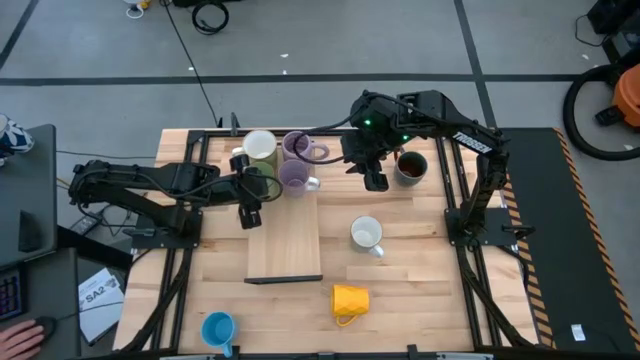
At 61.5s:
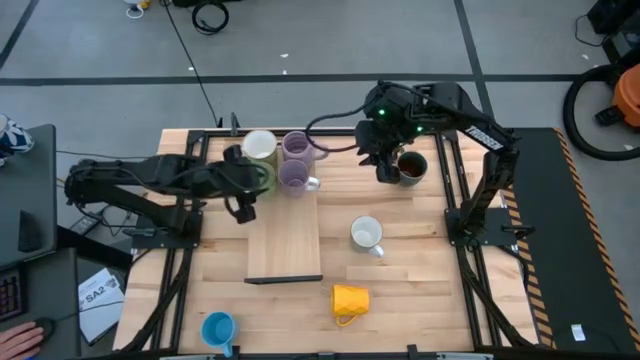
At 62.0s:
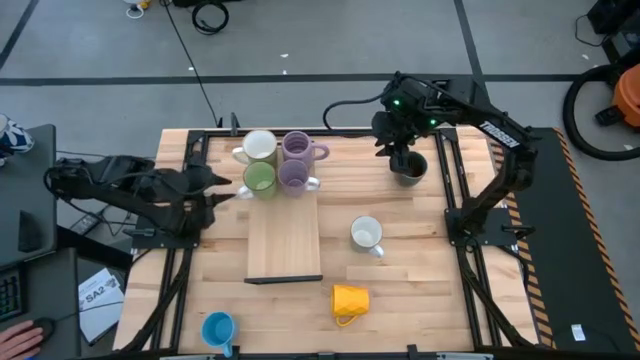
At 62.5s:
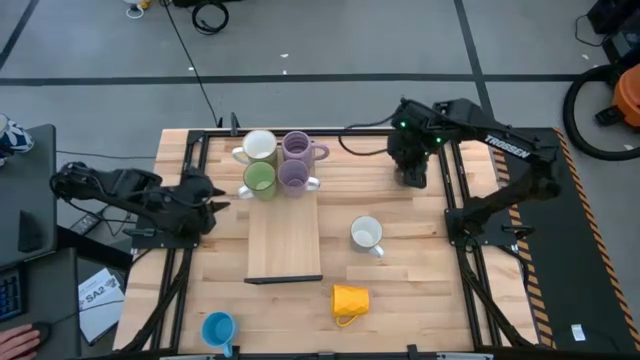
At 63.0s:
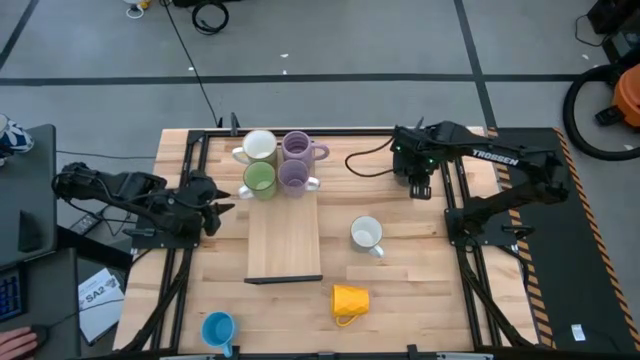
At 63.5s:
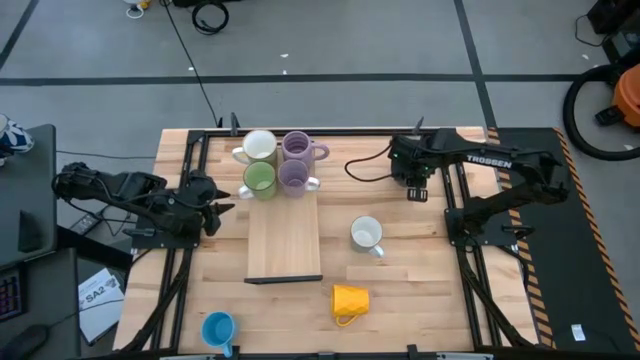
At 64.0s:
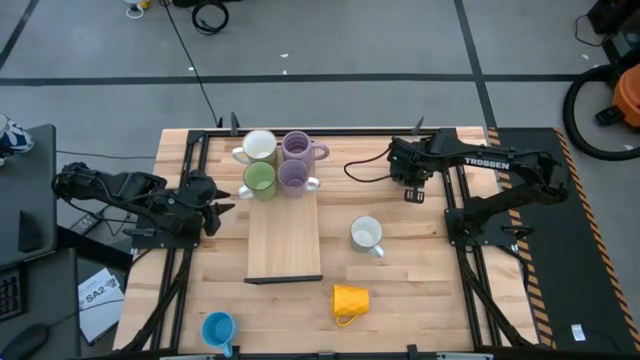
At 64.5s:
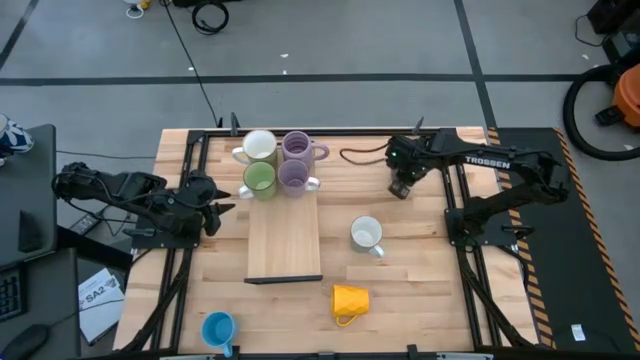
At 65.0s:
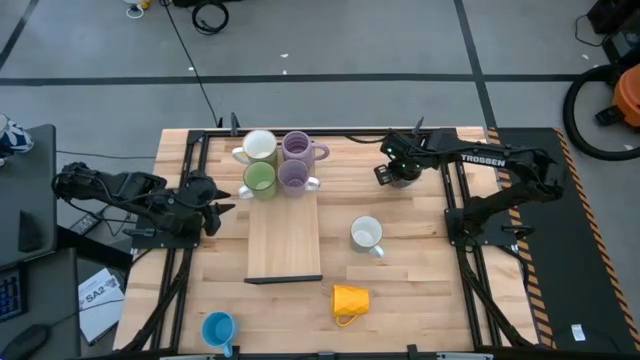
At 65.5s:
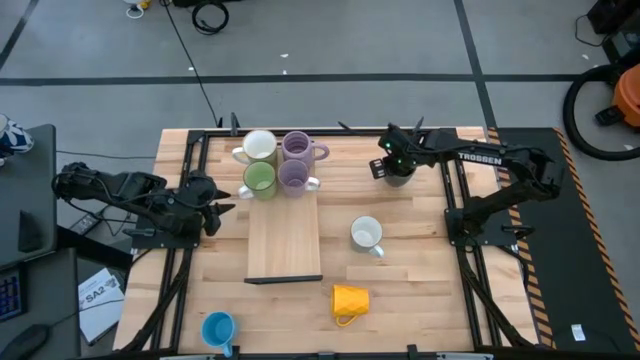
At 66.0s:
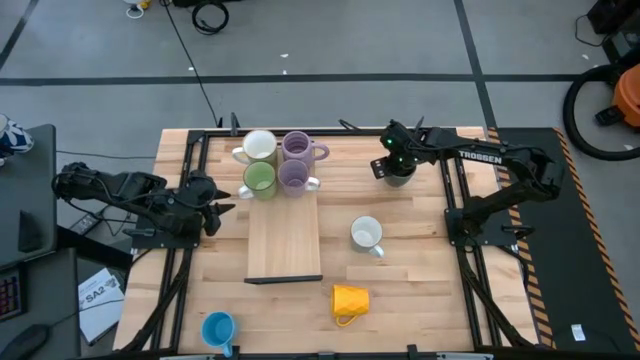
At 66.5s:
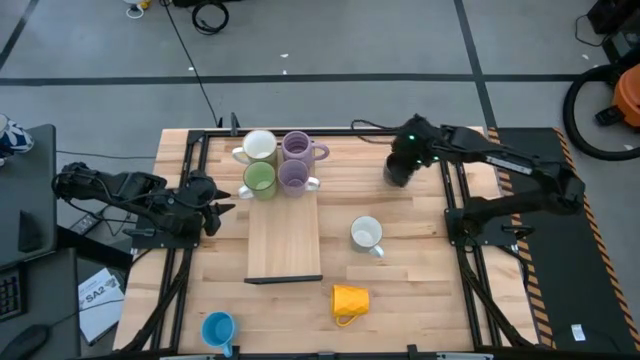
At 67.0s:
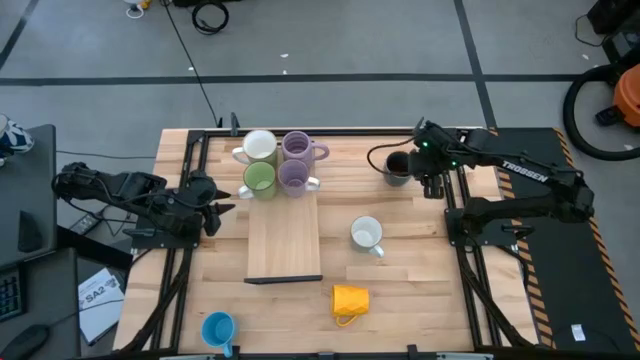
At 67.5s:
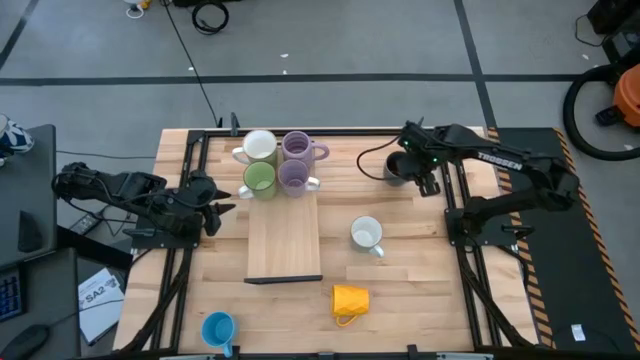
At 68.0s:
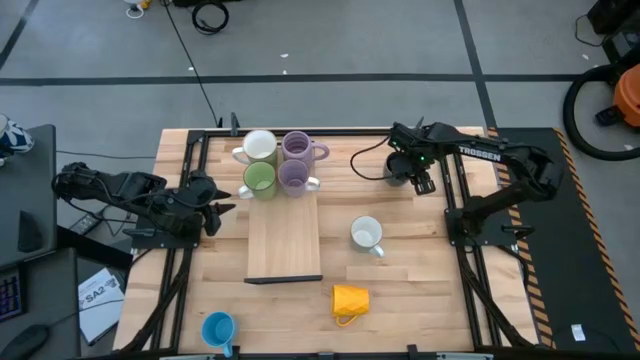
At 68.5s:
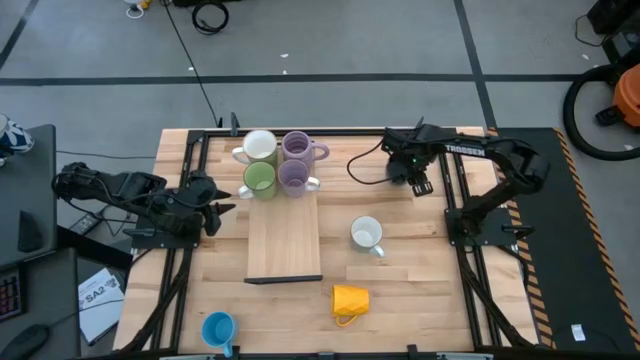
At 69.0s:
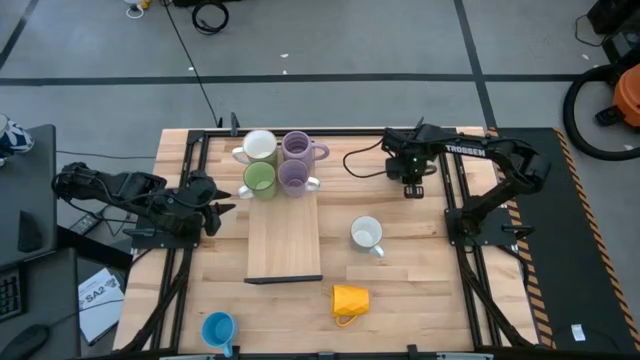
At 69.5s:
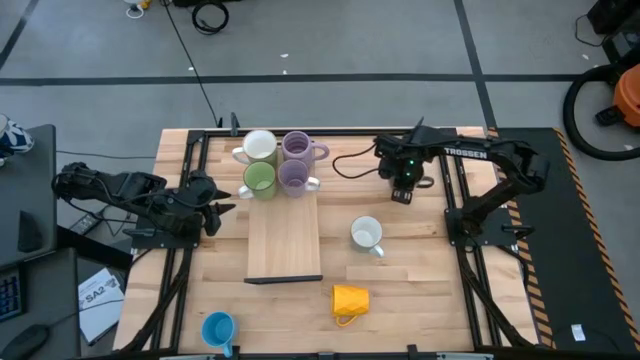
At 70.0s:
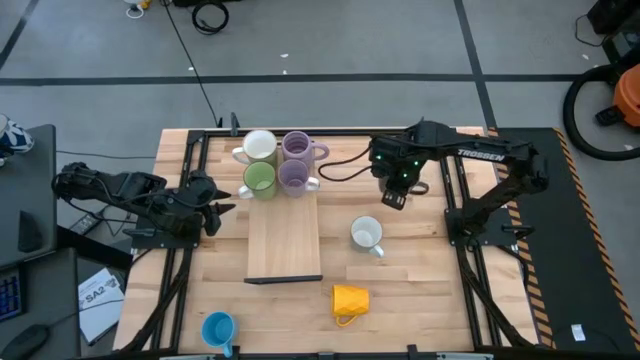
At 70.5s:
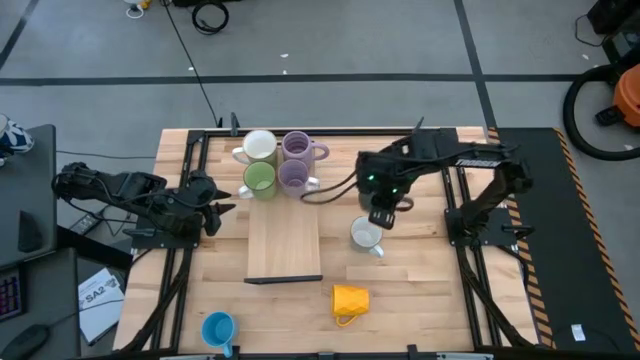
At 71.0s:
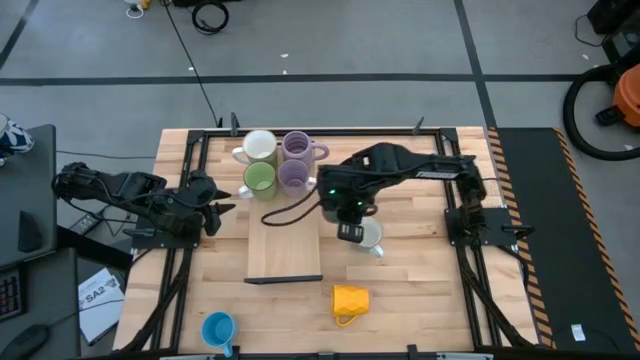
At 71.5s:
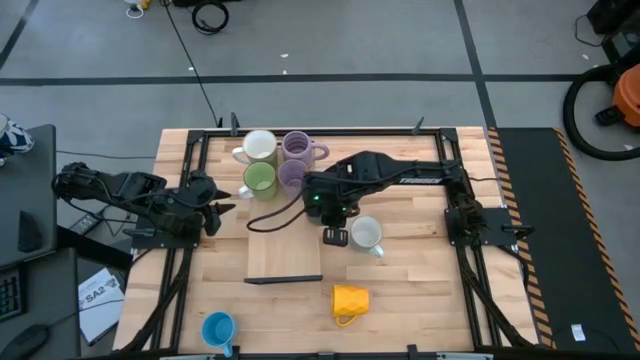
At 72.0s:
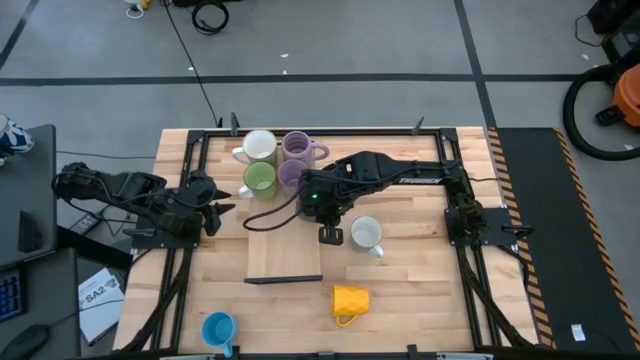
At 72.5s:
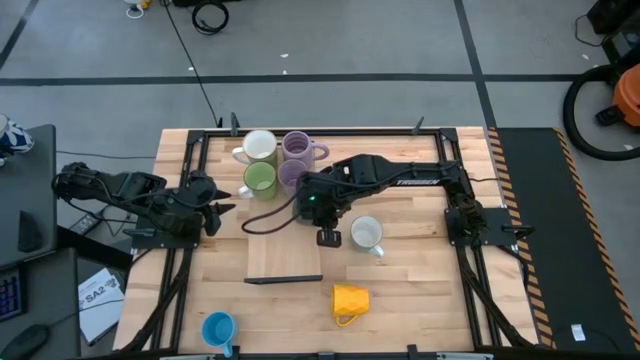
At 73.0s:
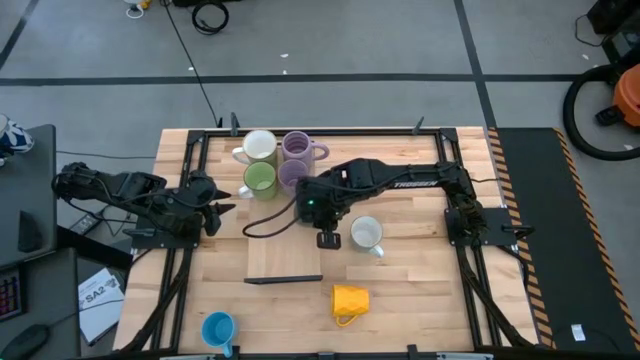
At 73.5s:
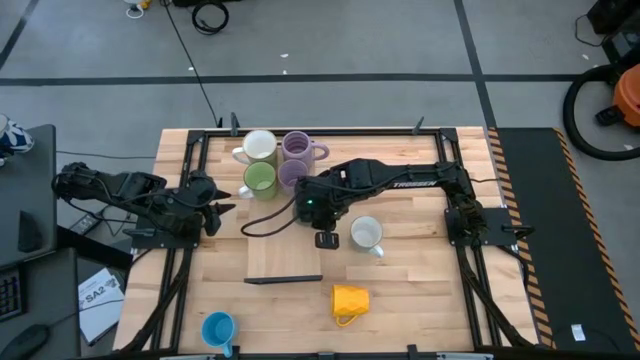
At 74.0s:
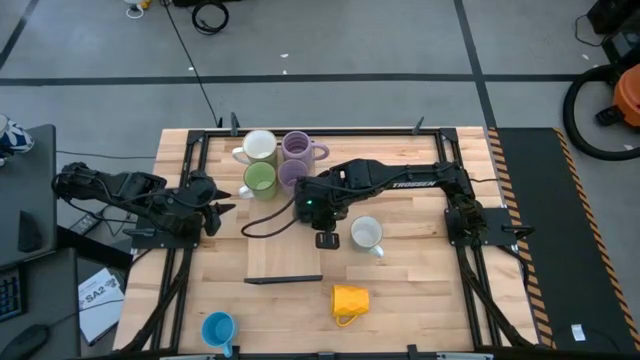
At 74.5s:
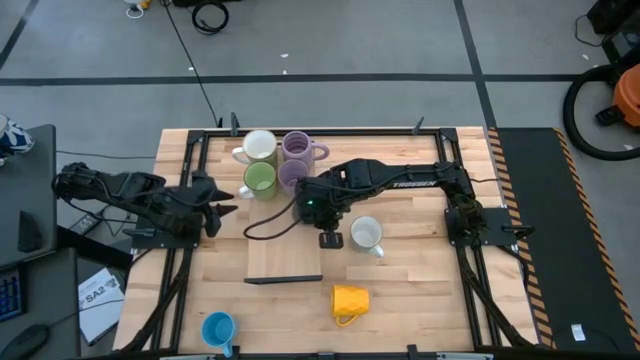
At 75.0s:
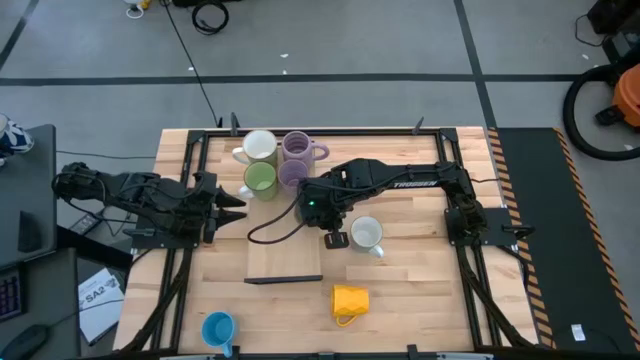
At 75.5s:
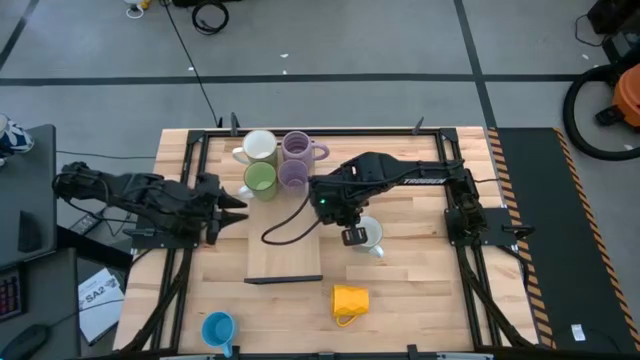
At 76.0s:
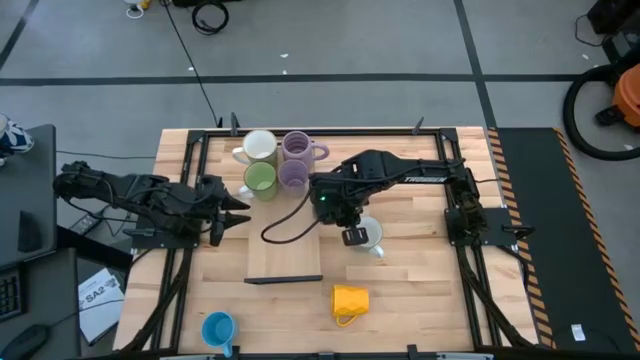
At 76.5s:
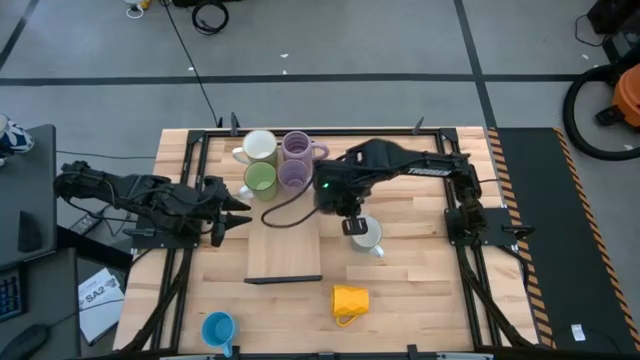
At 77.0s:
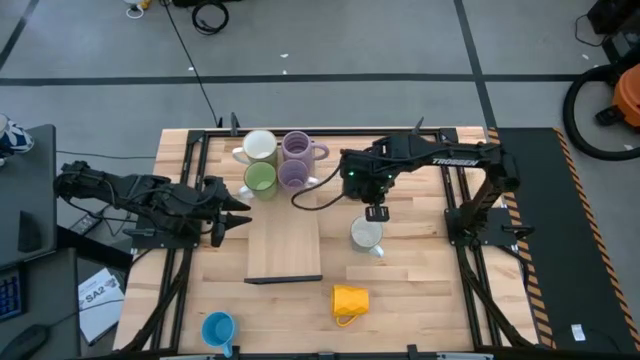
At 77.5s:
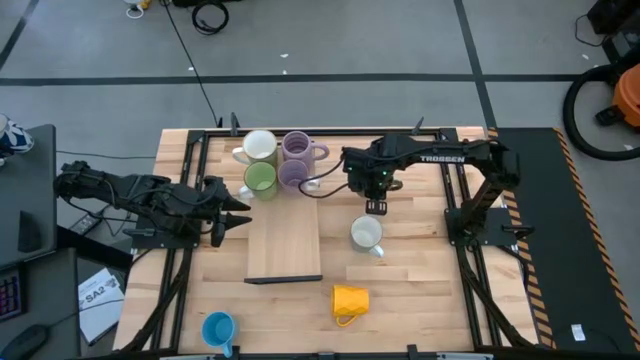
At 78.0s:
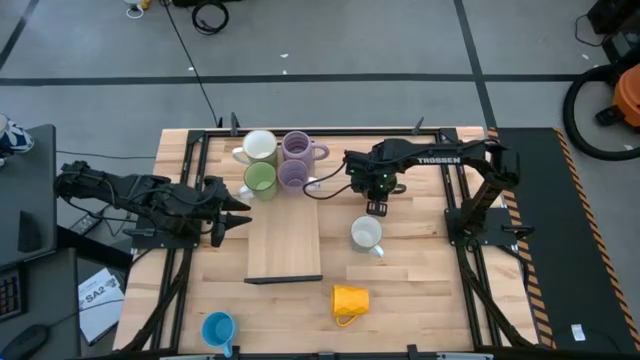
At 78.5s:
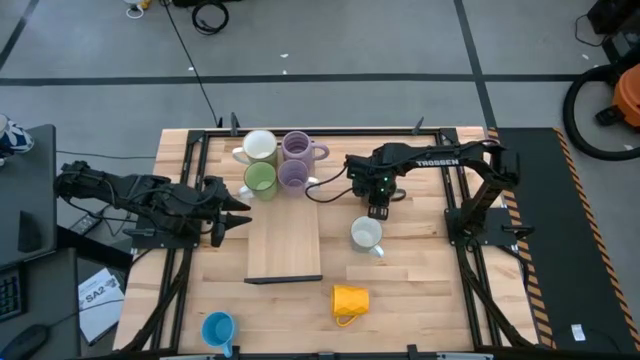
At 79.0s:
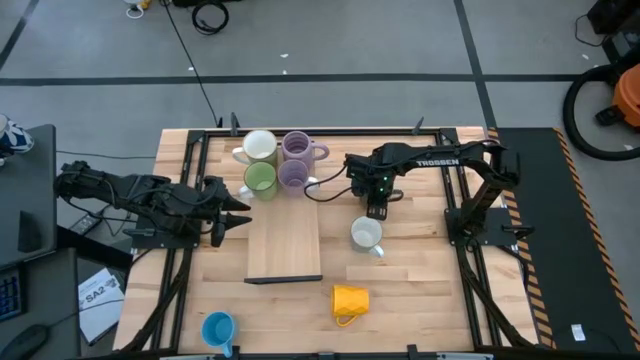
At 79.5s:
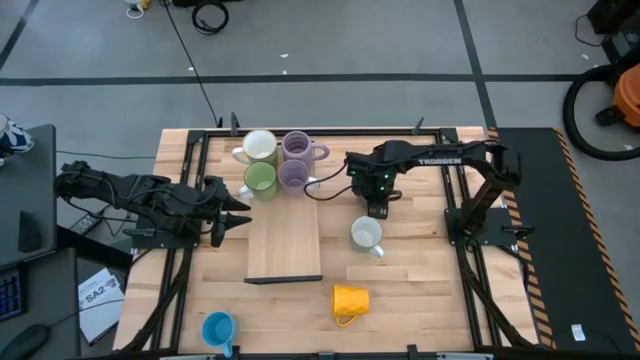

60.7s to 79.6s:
Task: Place coffee mugs
Put the blue patterned mug on the shelf

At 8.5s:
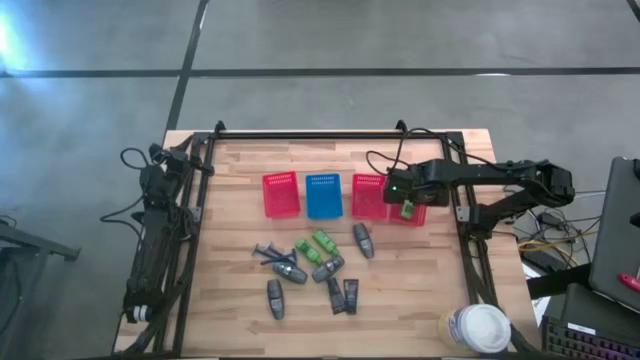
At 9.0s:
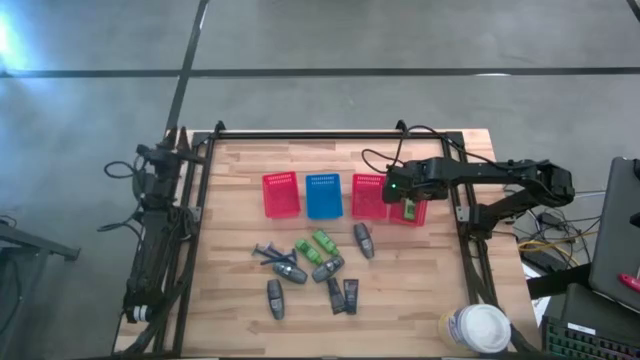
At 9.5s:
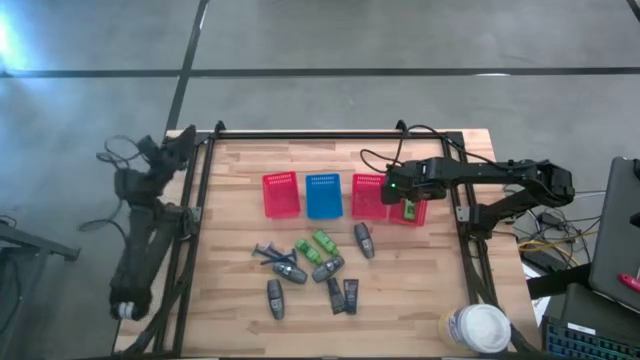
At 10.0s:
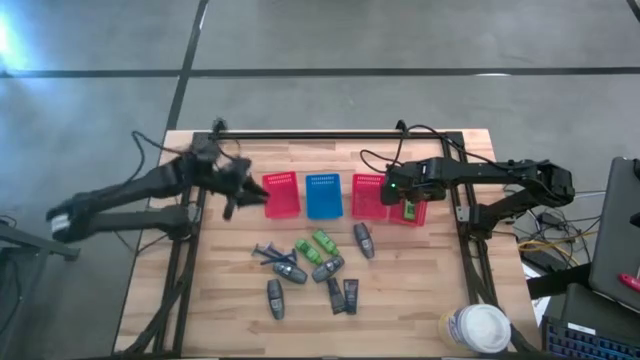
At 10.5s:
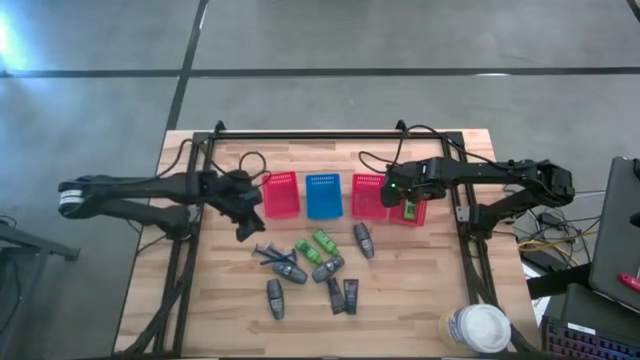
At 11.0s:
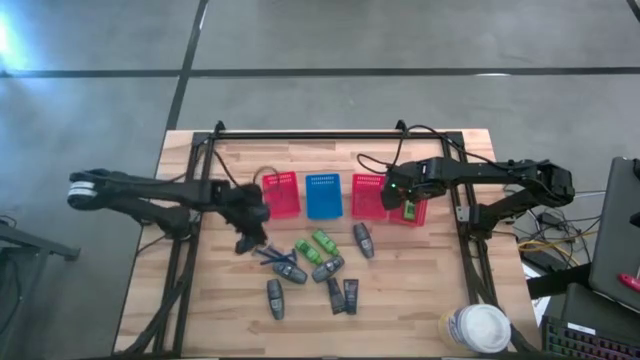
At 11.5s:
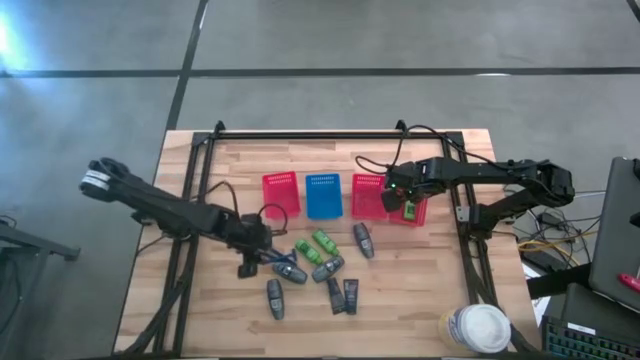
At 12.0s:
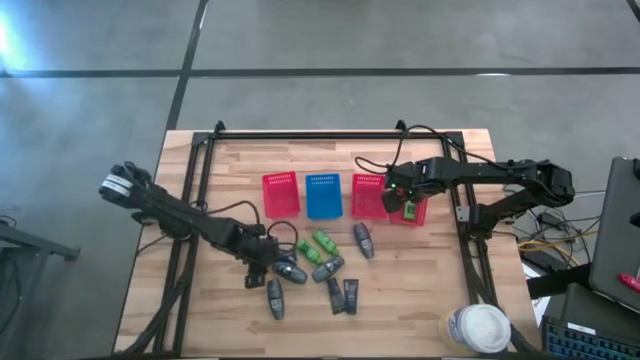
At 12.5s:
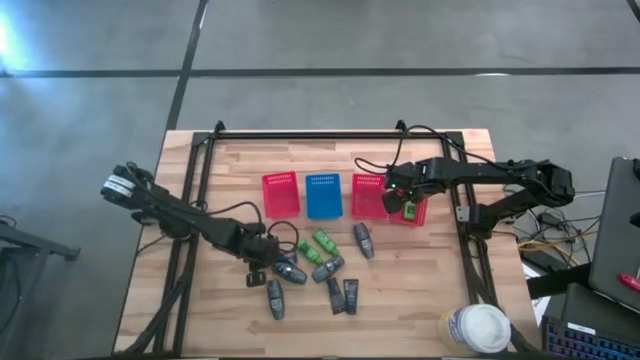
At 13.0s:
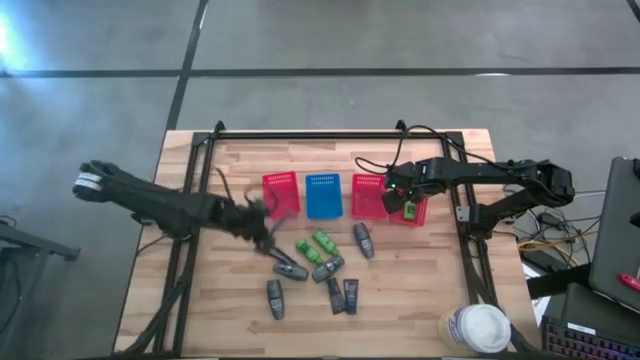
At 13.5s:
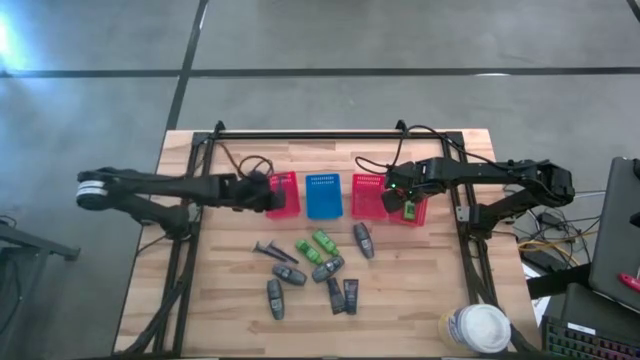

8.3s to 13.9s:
Task: Pick & Place Travel size toiletries
Put the blue razor into the left red bin
